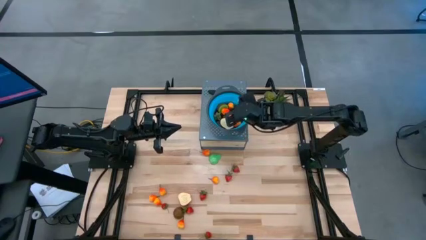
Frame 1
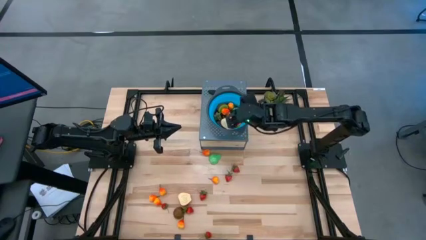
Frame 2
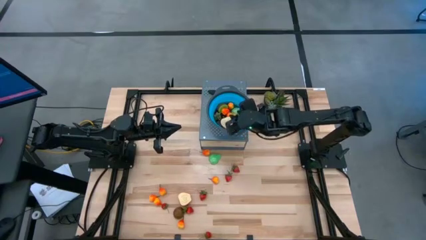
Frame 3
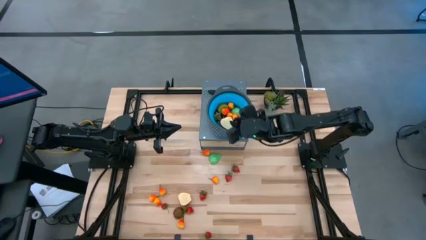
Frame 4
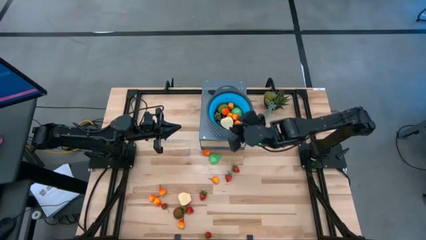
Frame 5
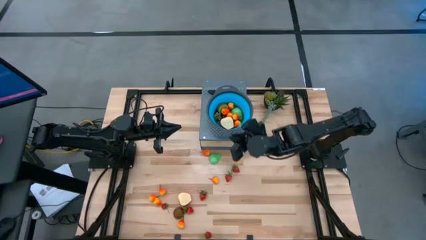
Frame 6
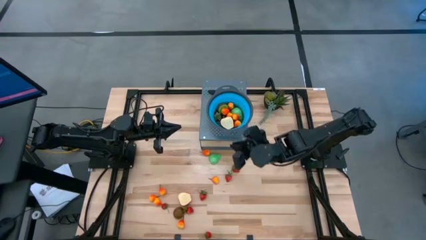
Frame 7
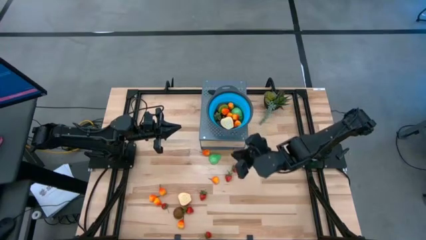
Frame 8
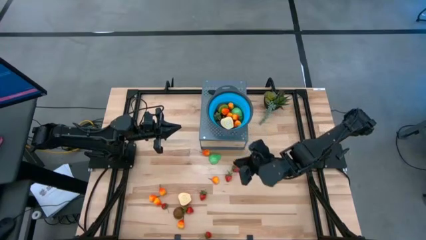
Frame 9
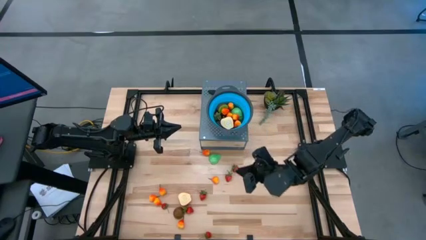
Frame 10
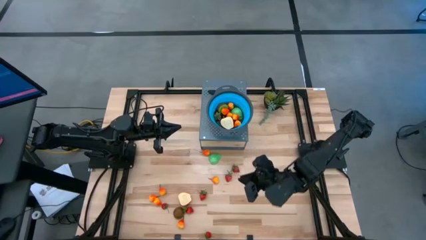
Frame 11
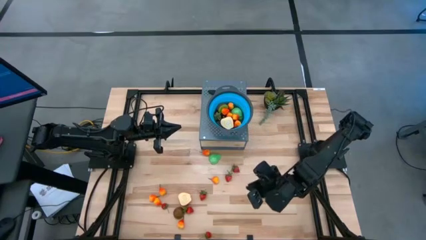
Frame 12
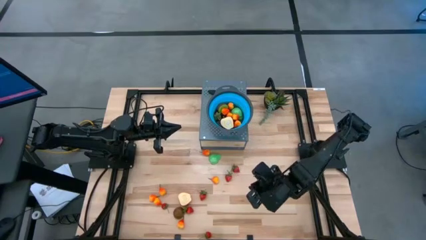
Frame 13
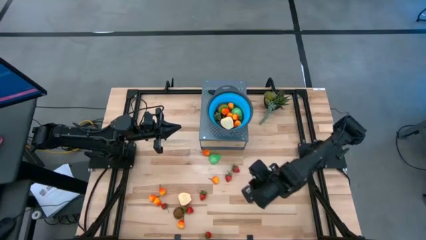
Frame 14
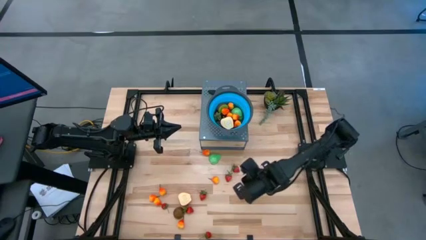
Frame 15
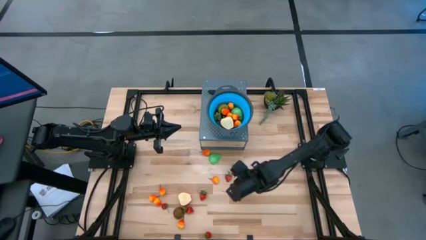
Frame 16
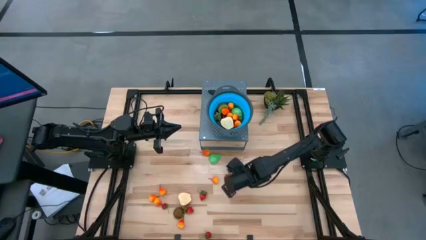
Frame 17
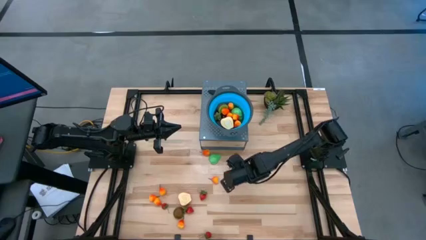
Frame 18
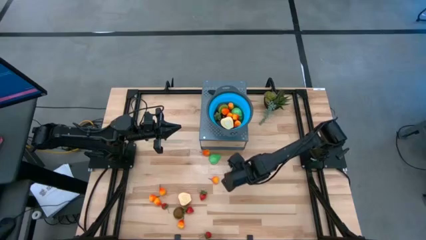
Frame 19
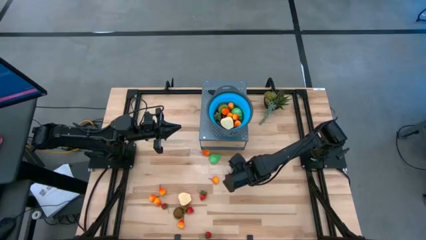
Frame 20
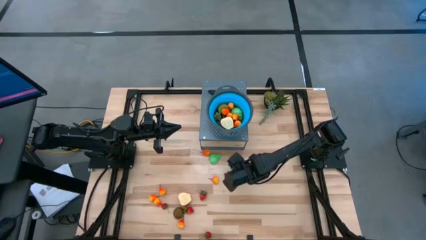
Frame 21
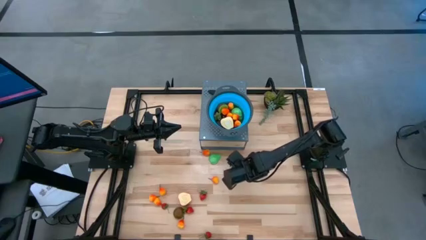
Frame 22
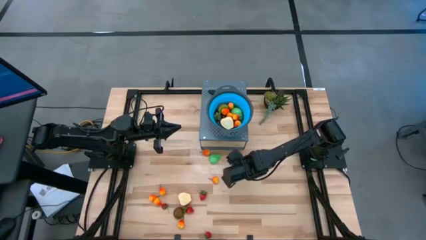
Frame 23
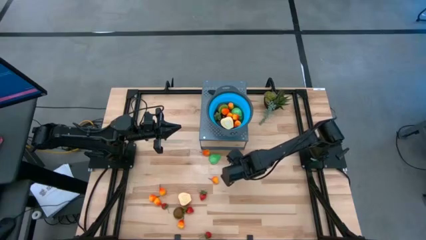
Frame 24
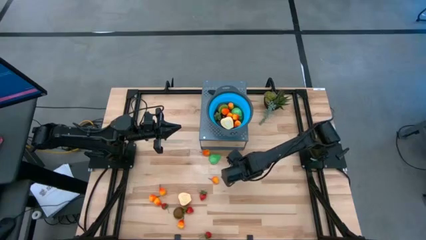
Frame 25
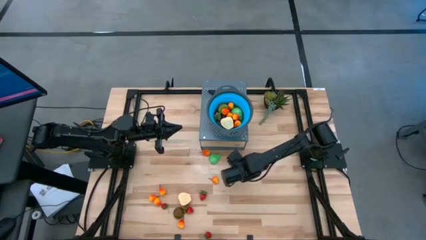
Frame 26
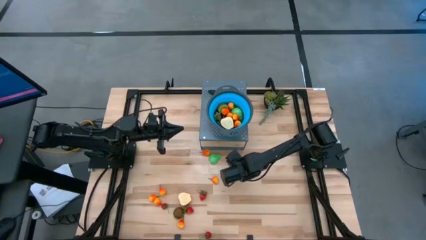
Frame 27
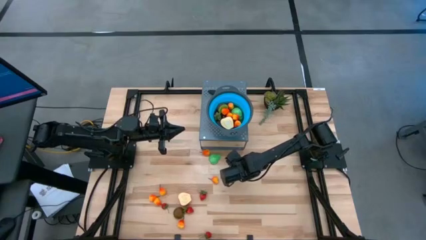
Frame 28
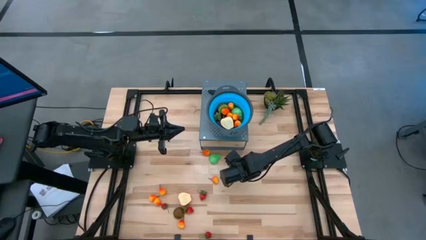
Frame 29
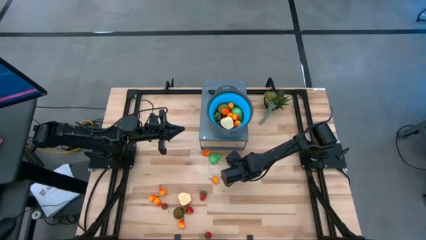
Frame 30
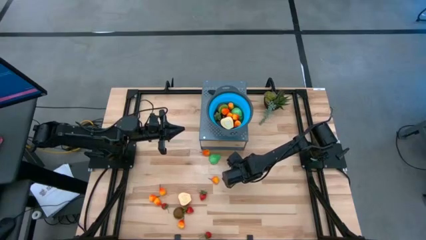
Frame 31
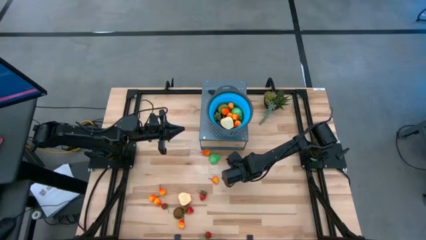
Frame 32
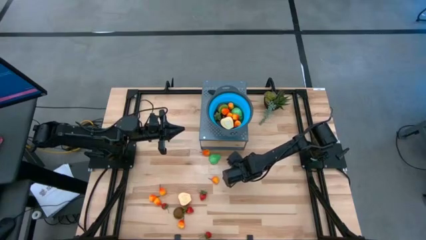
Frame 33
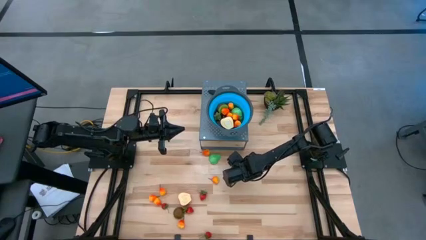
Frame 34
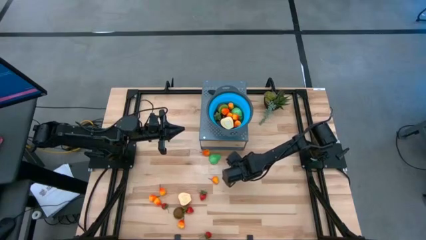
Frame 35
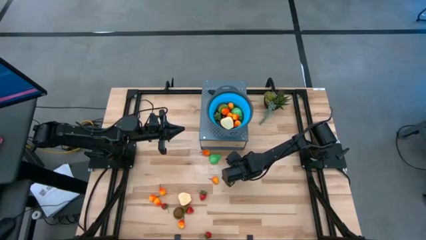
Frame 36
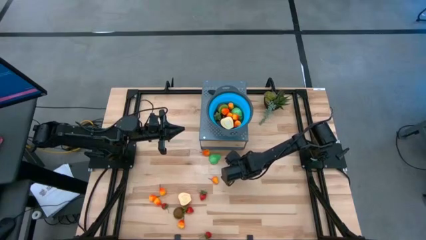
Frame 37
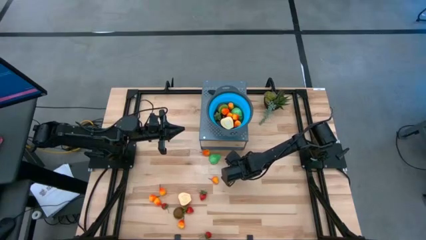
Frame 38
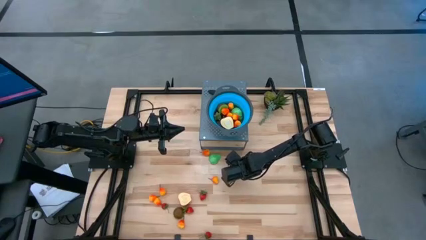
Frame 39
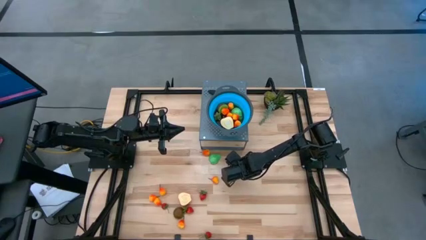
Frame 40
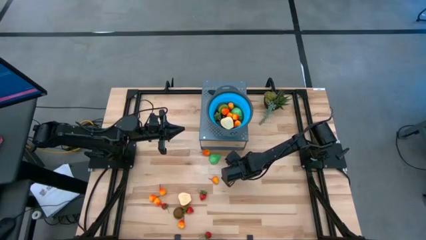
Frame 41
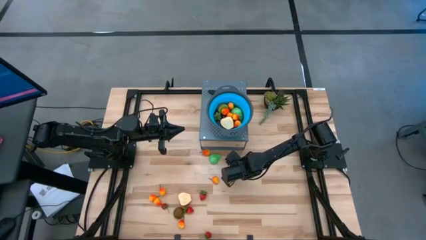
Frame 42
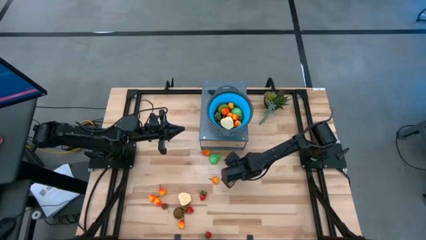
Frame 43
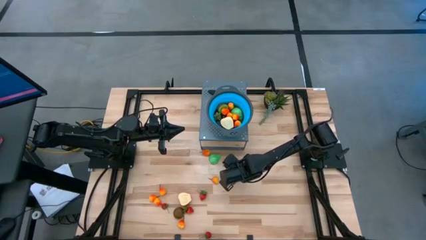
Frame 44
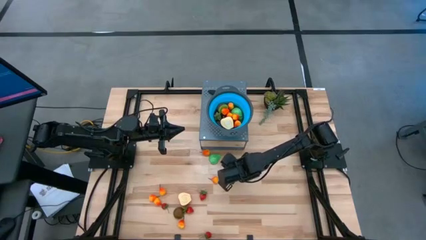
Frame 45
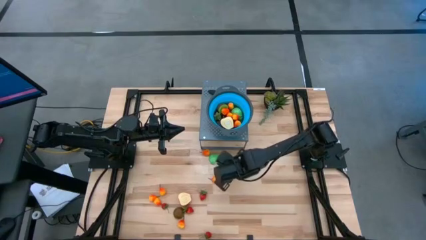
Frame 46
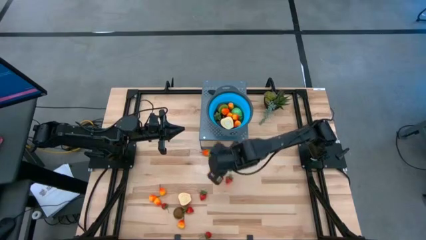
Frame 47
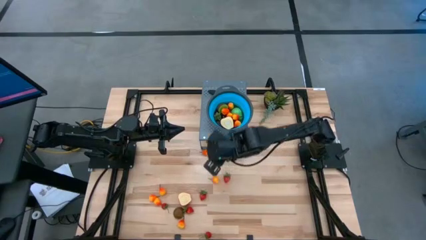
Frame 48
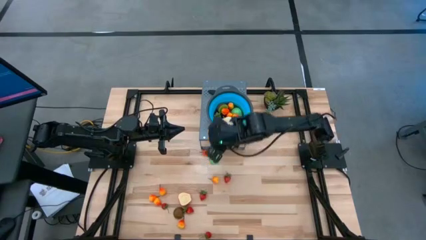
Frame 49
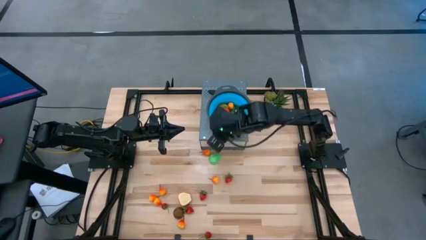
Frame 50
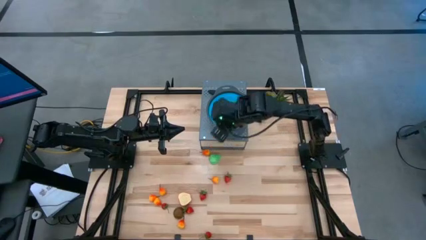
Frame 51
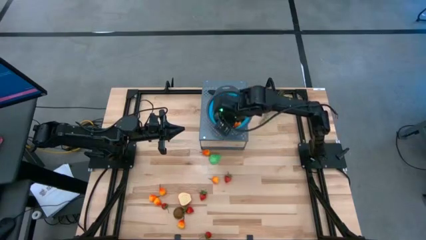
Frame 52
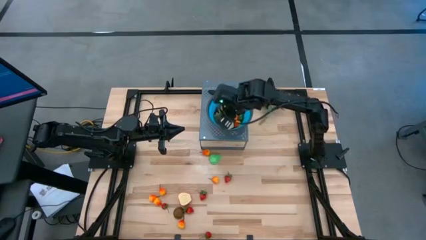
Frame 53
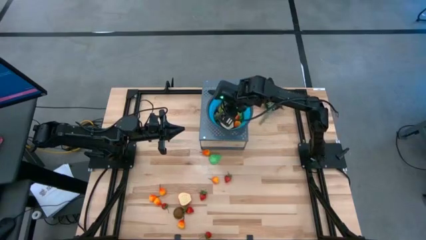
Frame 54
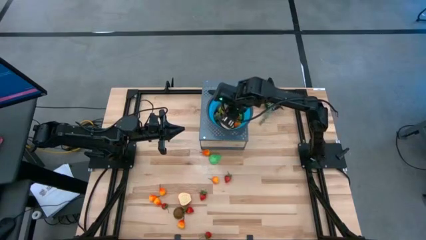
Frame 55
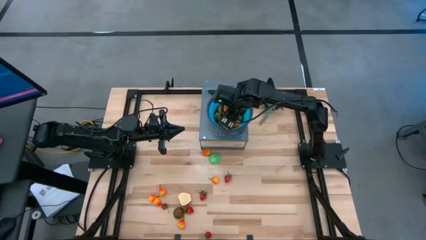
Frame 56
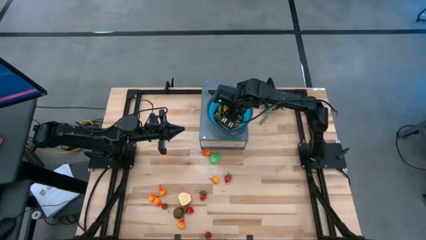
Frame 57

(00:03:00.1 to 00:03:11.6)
Task: Pick & Place Fruit
Put the strawberry into the strainer bowl

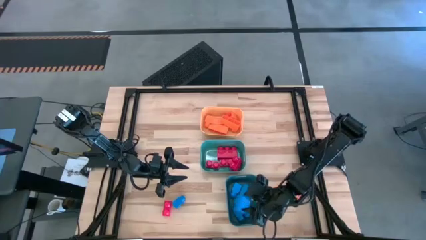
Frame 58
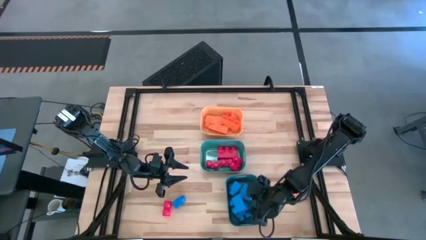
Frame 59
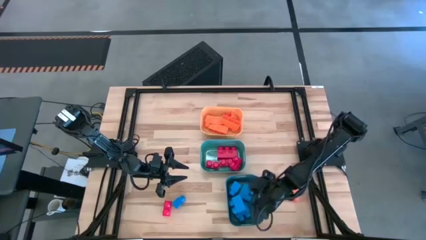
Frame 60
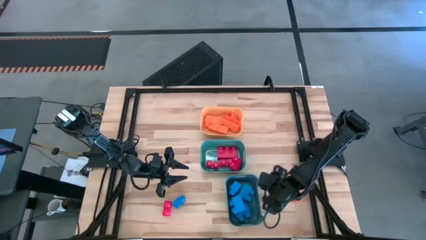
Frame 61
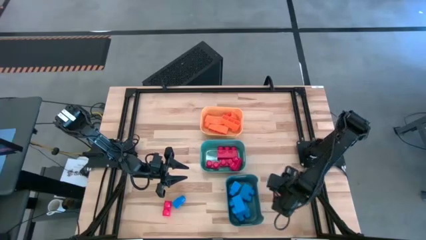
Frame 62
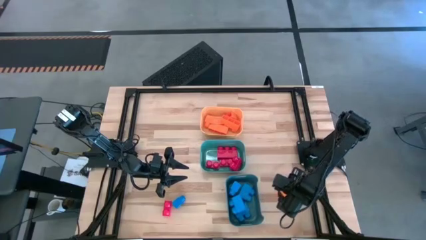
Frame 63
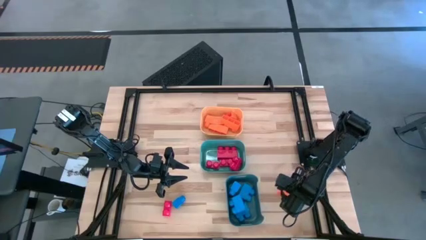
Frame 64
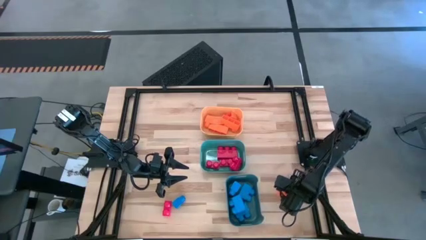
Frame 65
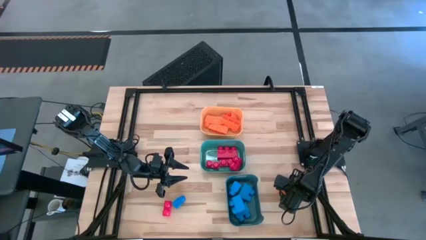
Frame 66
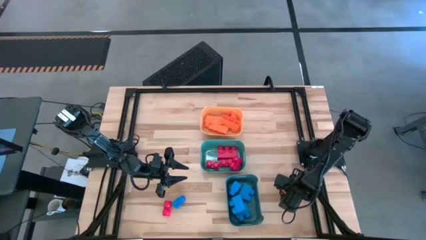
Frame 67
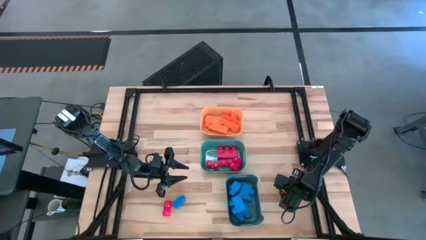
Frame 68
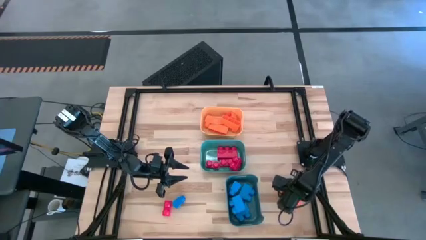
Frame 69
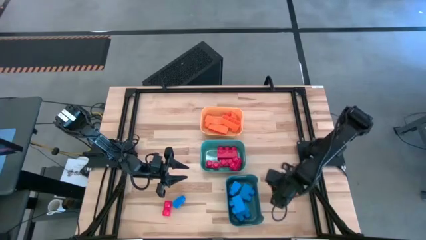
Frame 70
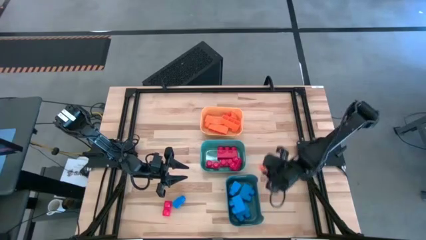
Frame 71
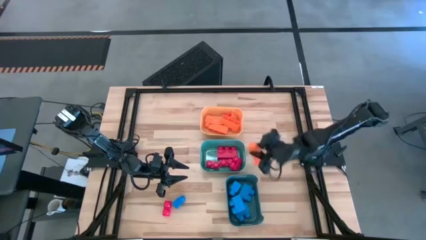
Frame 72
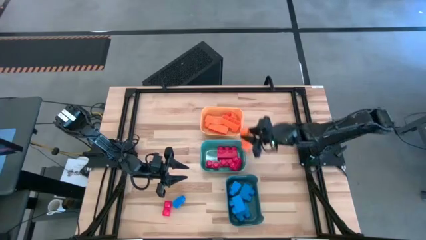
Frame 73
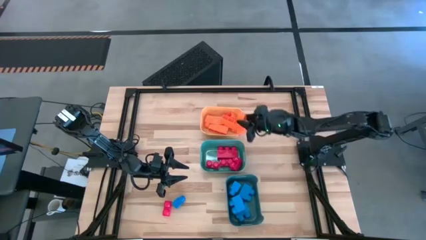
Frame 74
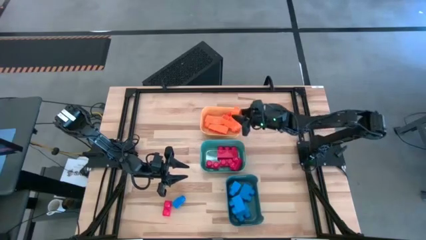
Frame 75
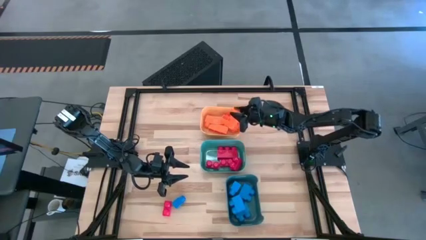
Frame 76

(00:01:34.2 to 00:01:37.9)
Task: Sort & place blocks by color
Put the orange game piece into the orange bin

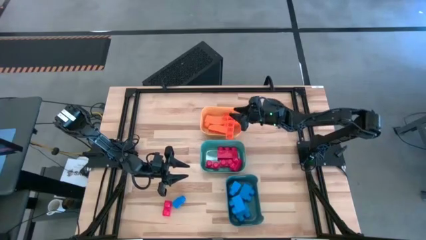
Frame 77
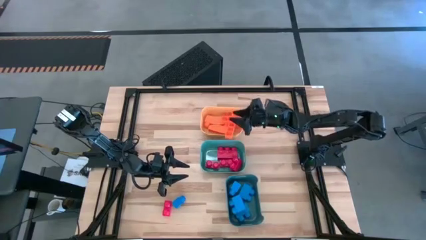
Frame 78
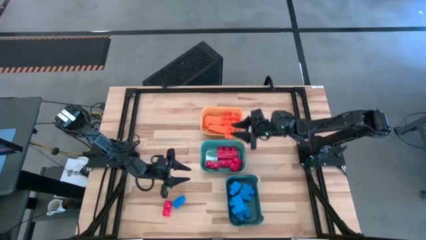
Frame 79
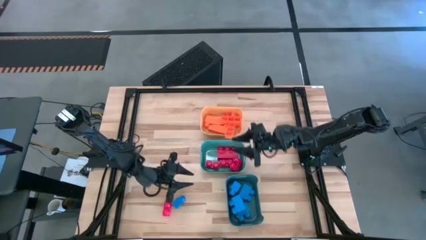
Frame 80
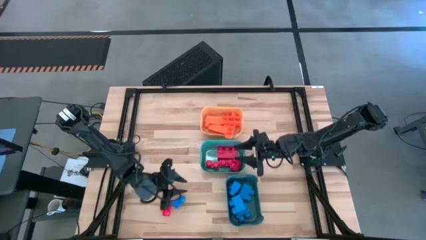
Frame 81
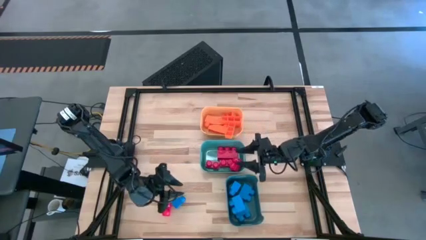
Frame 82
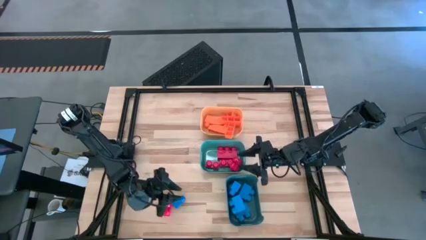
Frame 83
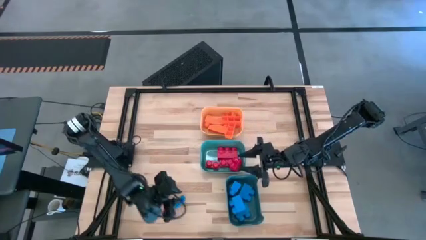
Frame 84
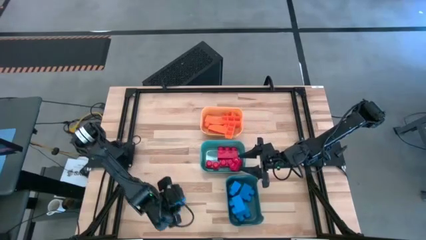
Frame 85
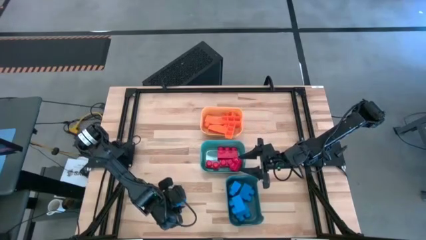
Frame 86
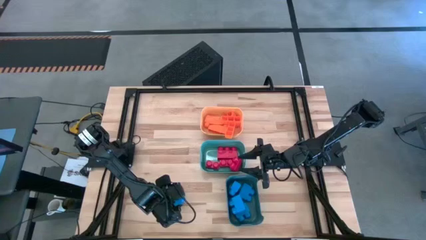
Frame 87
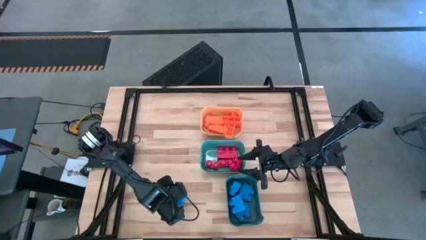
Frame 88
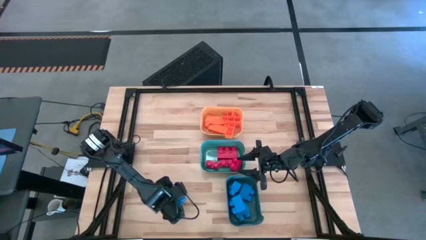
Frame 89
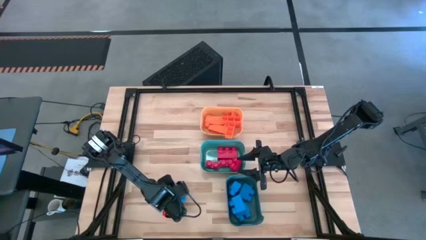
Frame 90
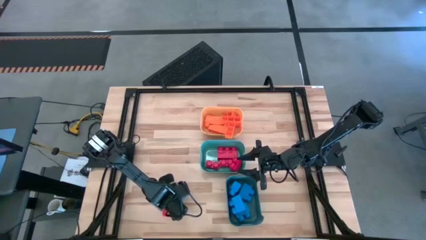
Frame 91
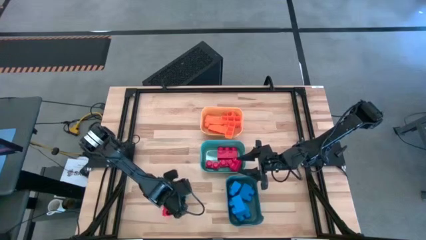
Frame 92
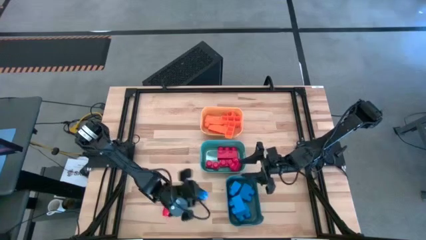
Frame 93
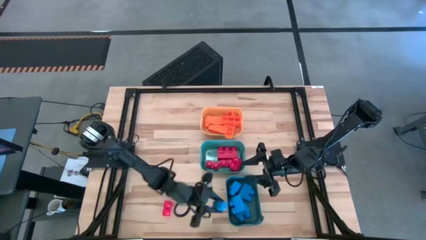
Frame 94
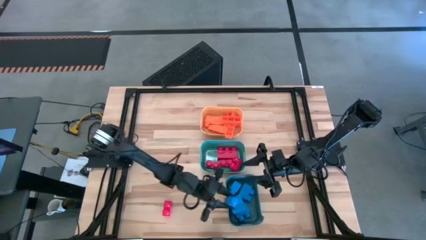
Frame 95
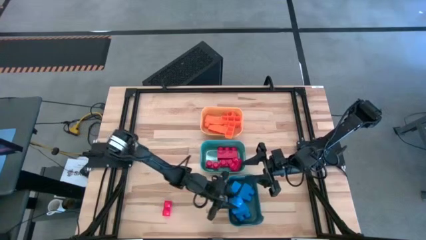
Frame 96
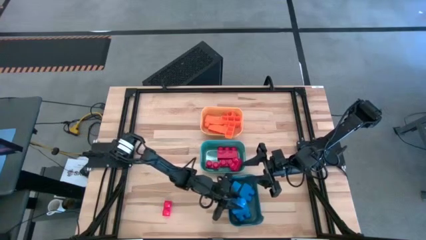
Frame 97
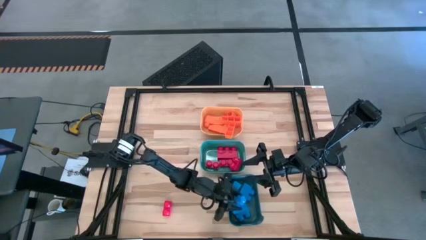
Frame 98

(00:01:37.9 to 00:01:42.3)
Put the blue game piece into the blue bin
